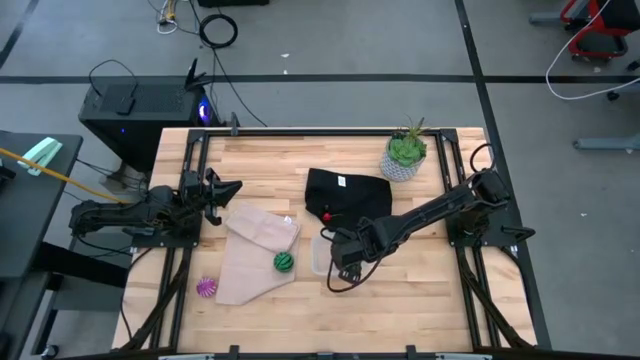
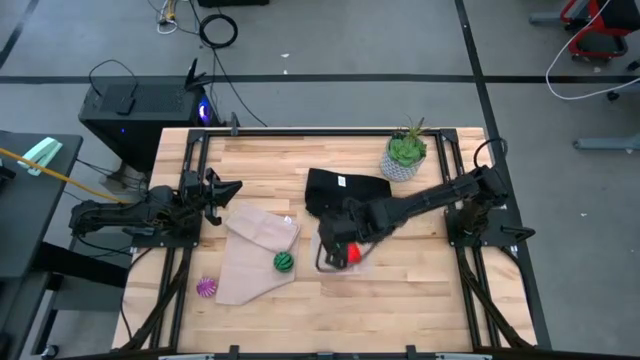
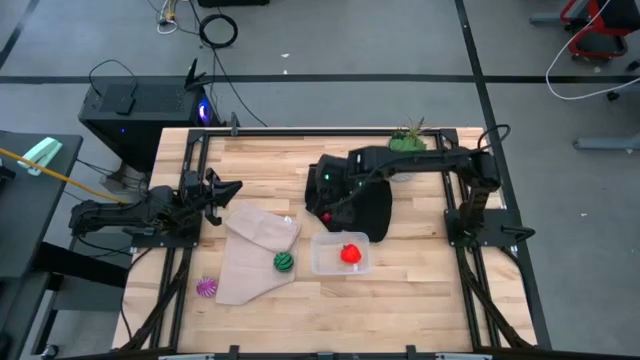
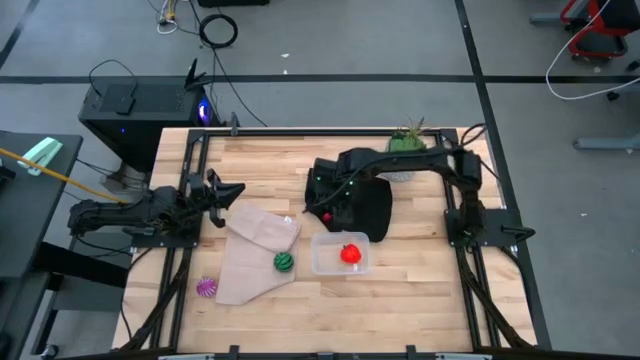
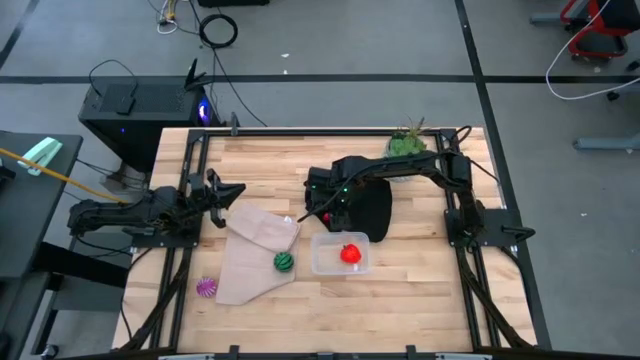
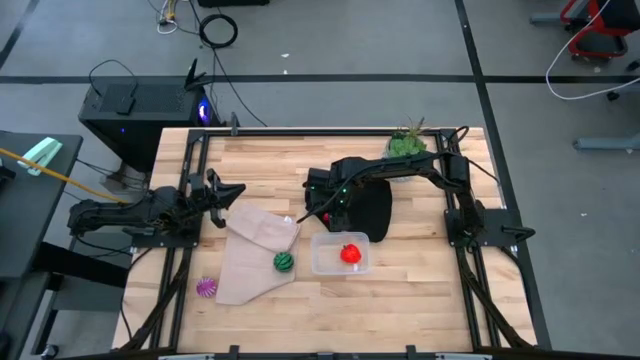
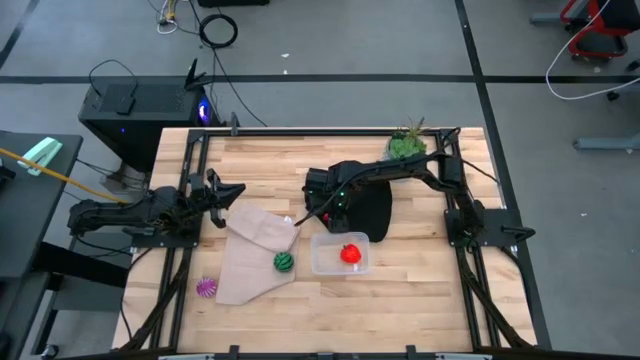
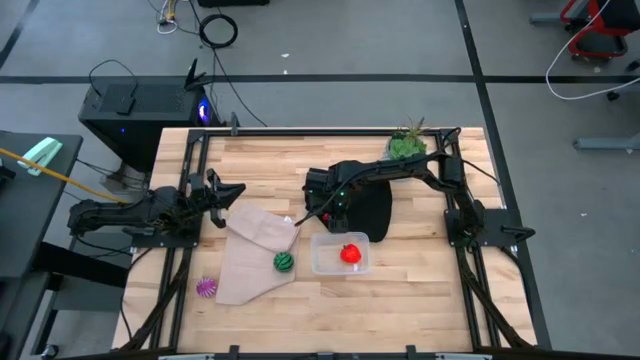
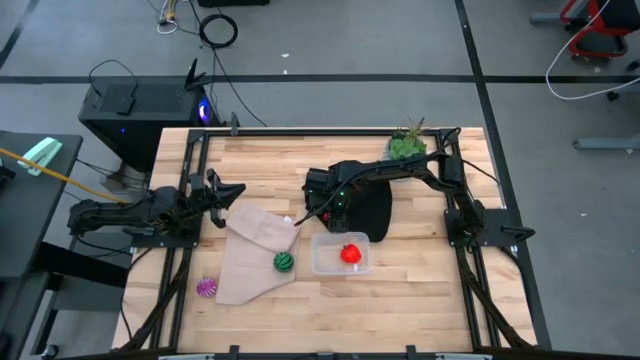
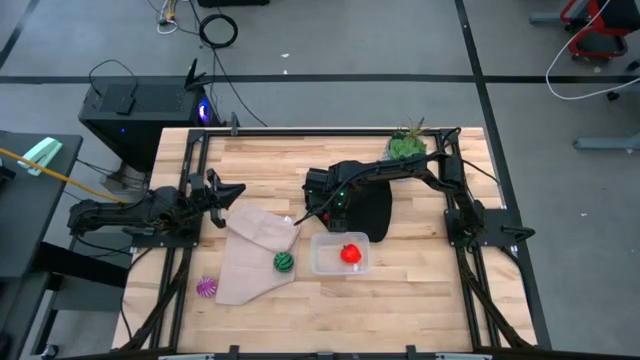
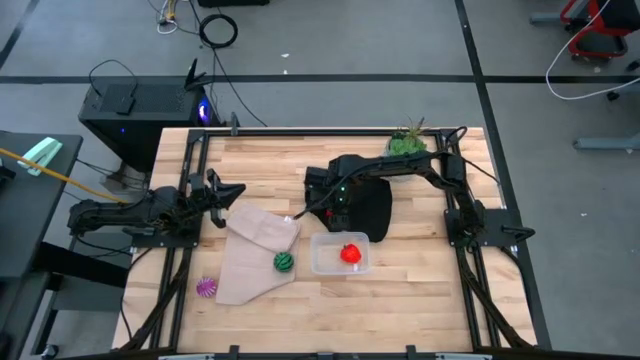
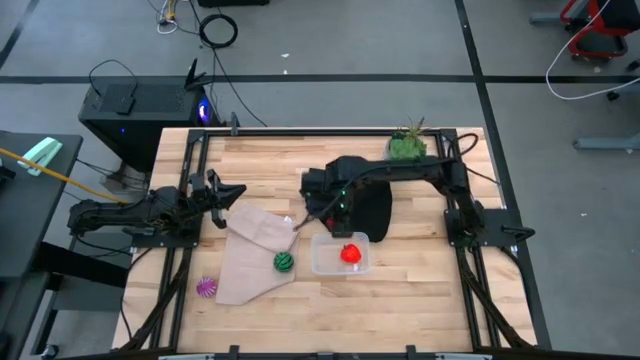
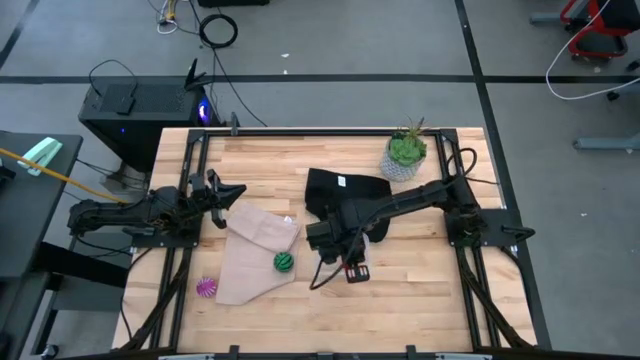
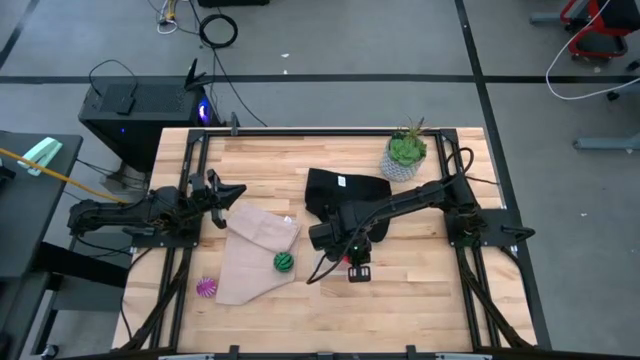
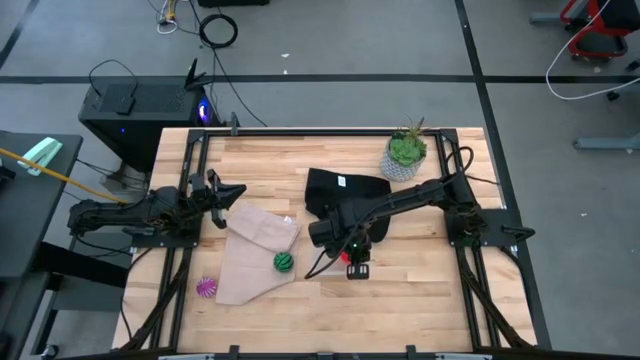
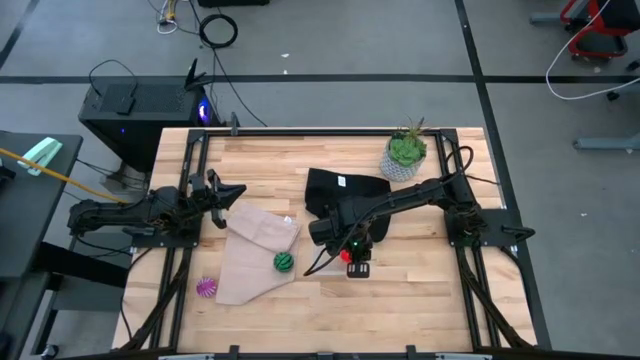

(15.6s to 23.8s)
Task: Pick and placing Produce into tupperware
Put the cherry into the transparent bin

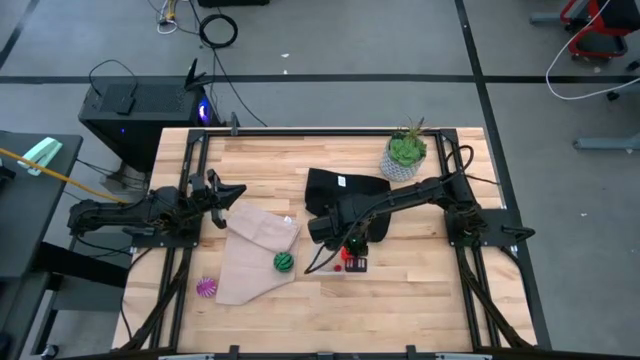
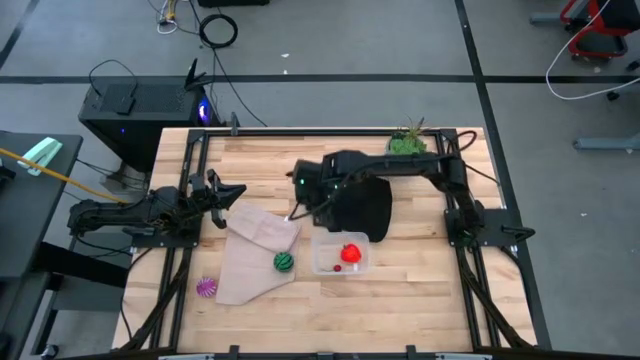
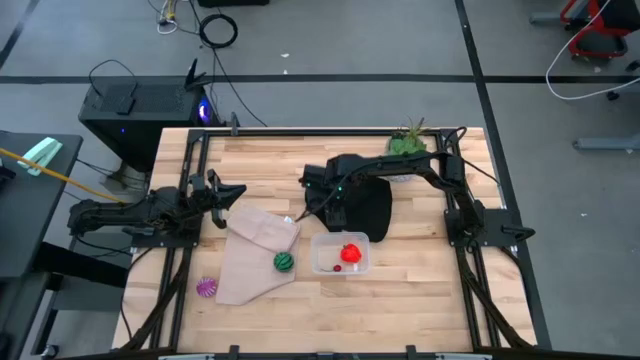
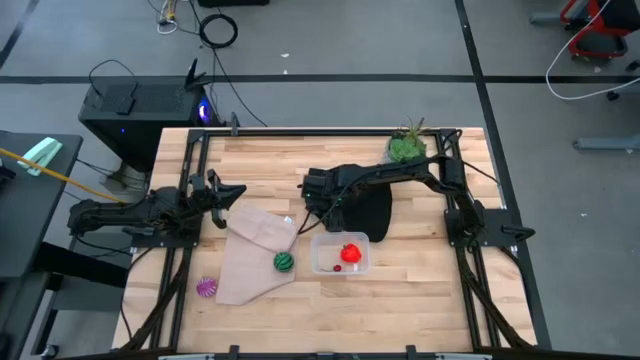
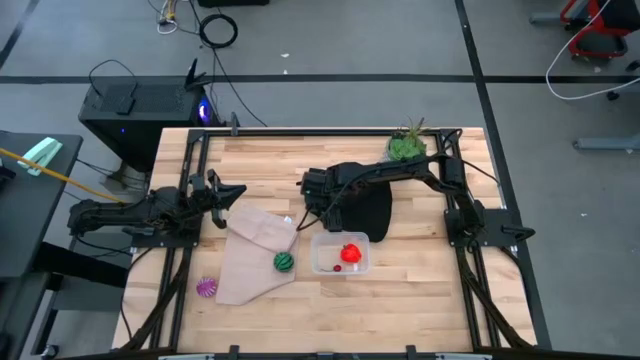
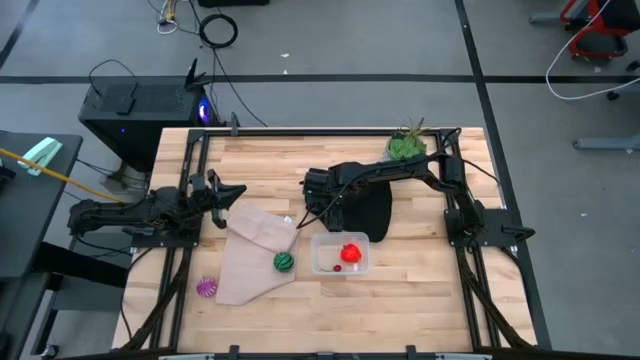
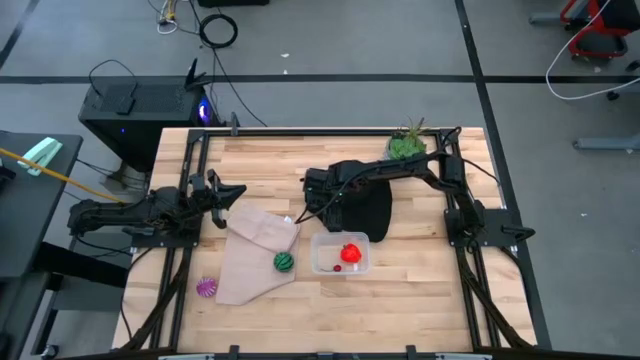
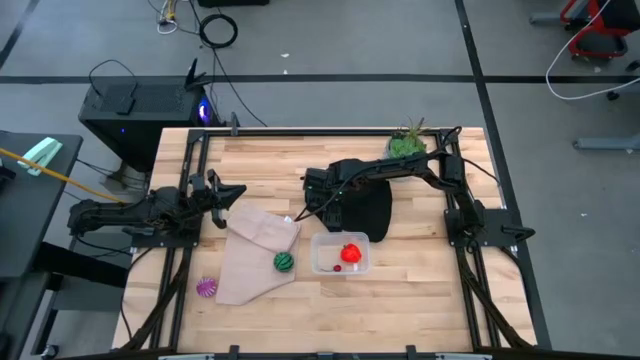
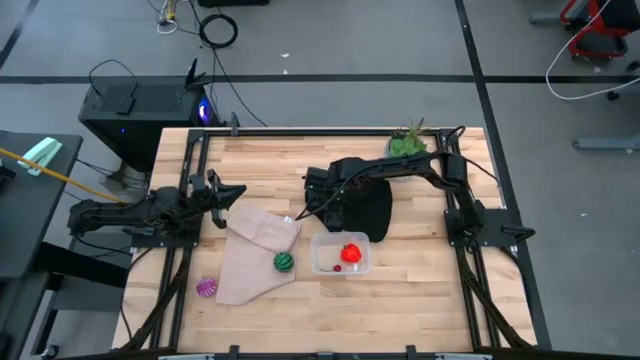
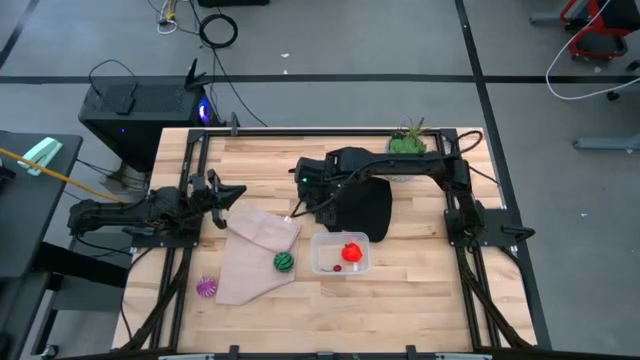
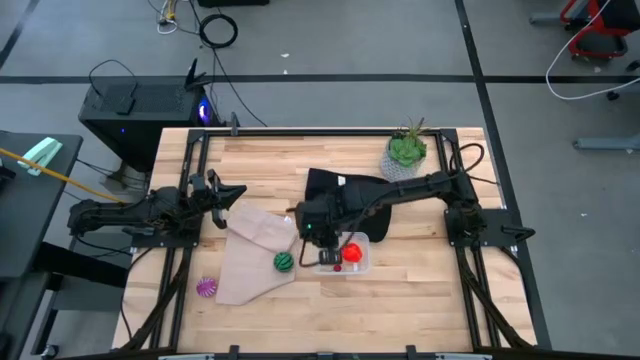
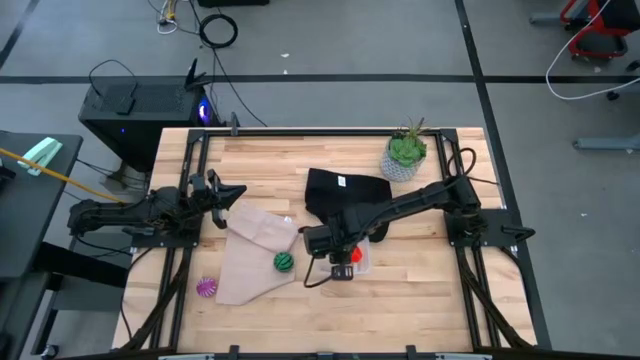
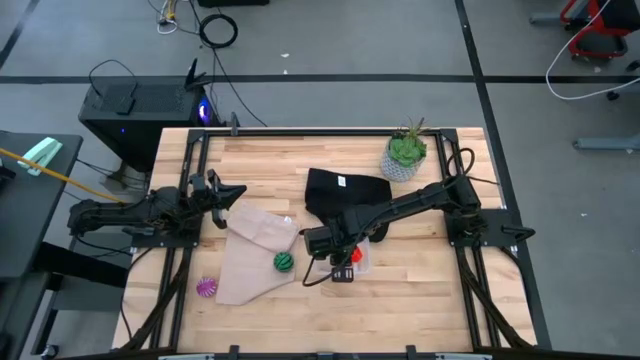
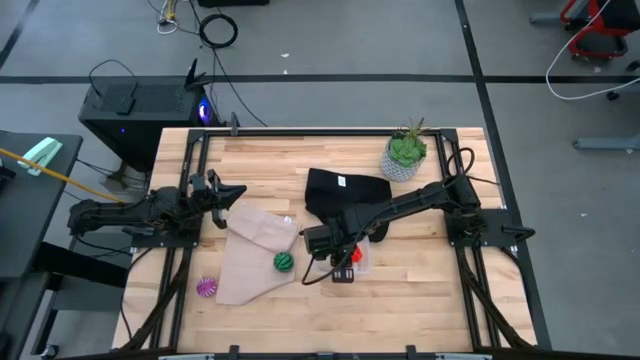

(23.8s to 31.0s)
Put the plum into the transparent bin

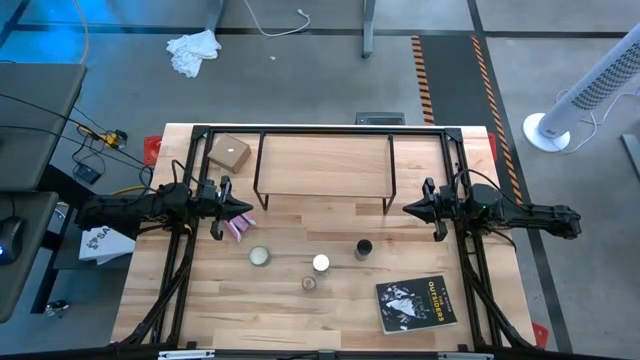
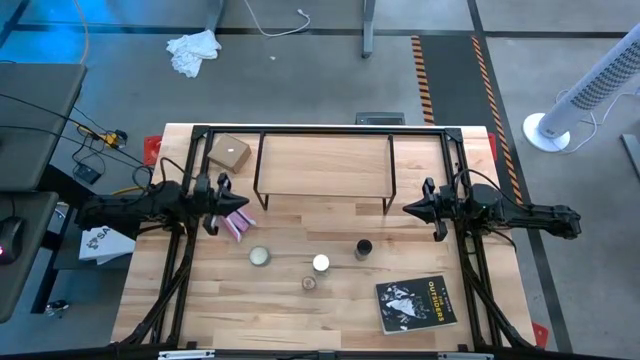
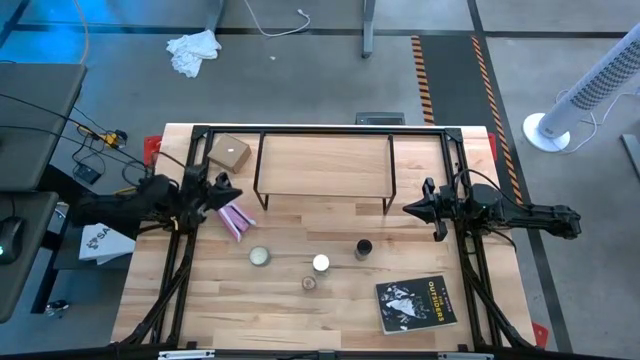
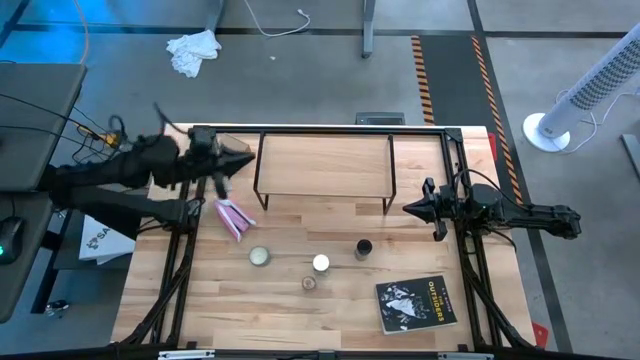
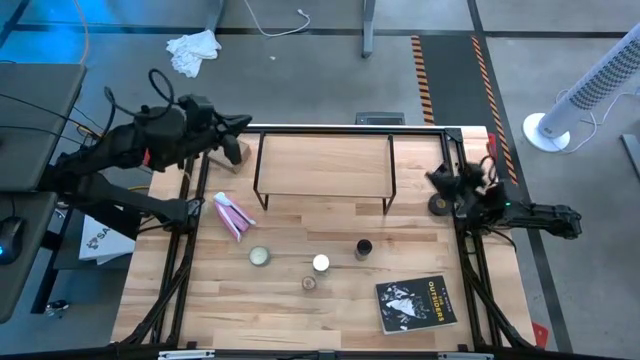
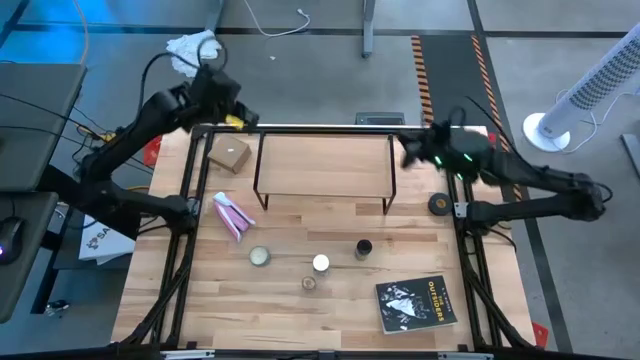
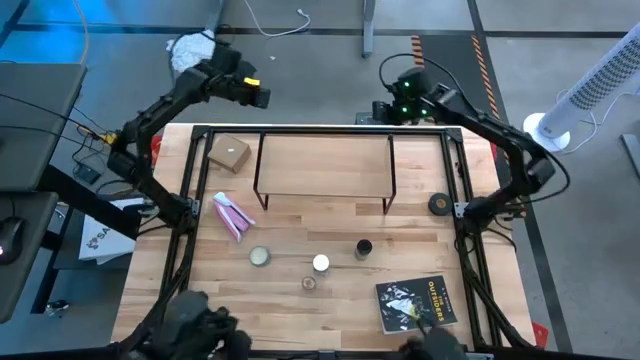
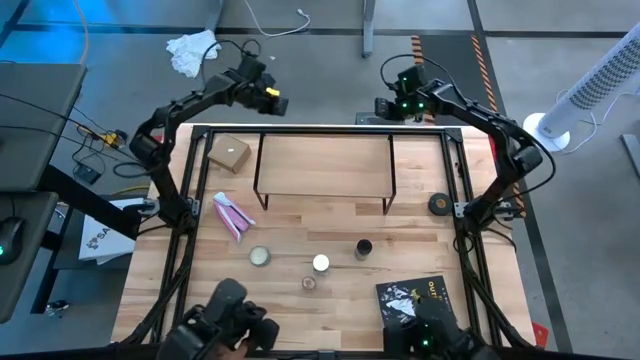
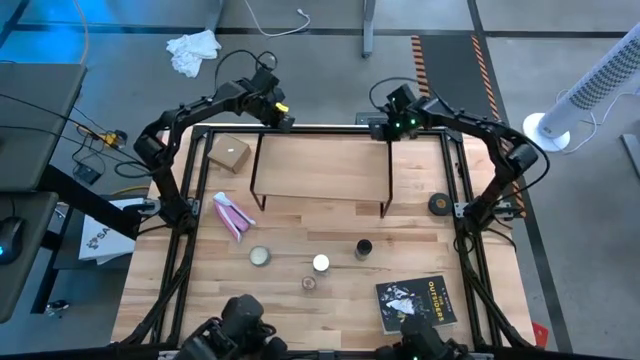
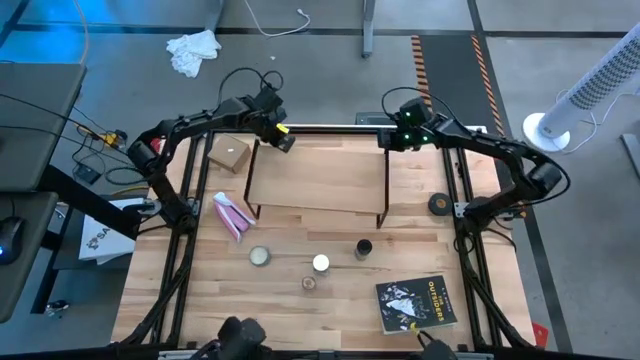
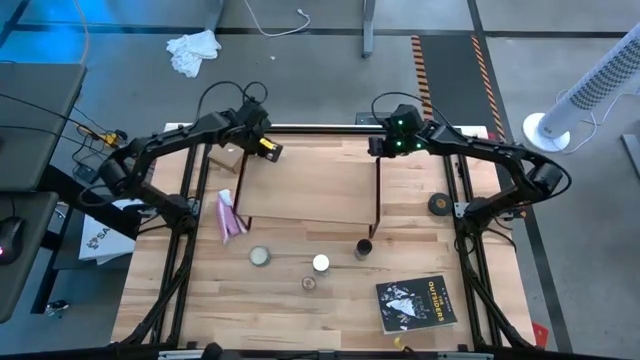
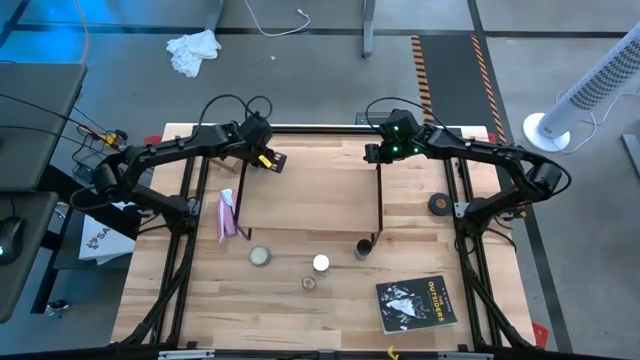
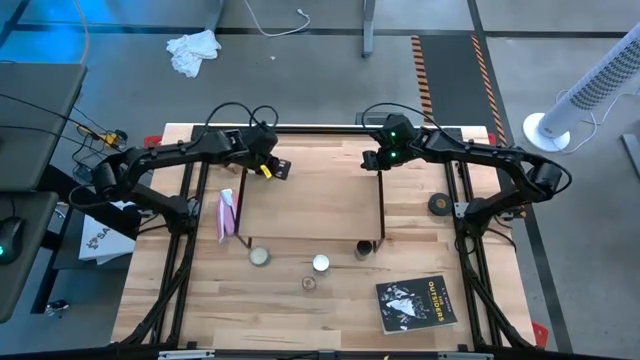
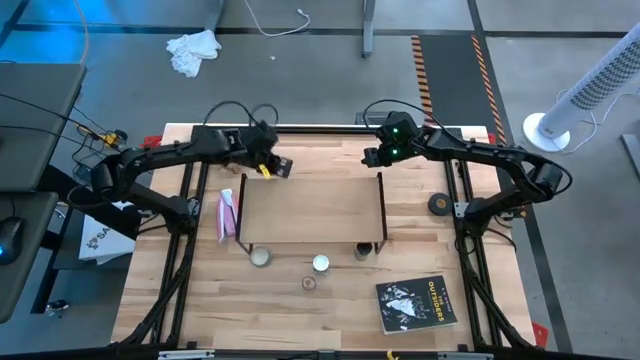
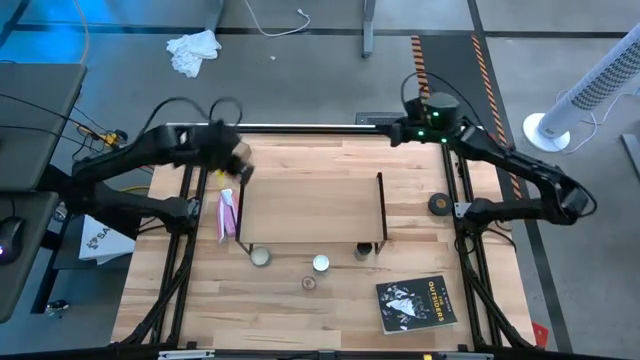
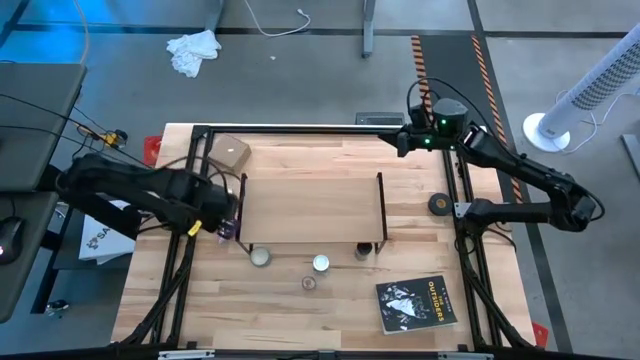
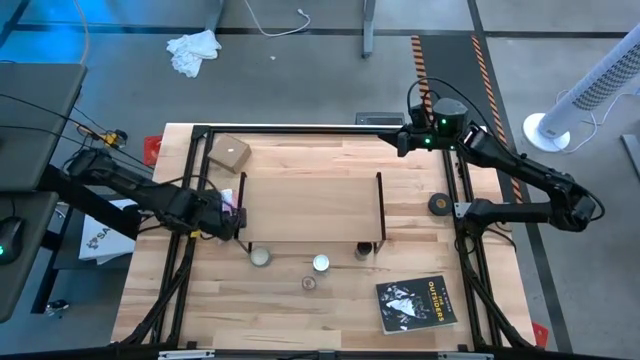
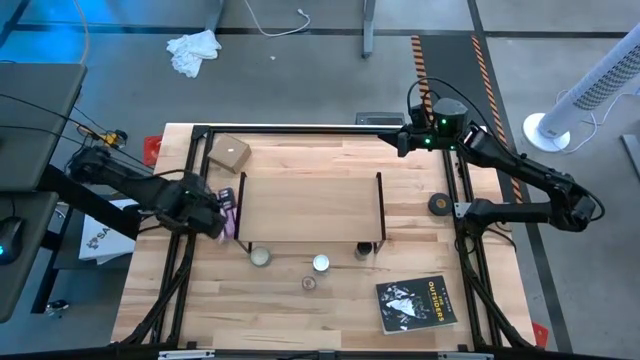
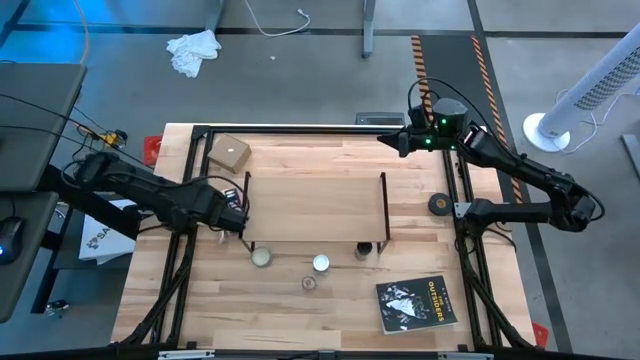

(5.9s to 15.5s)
Task: Shelf spices
Move the shelf to the middle of the table
